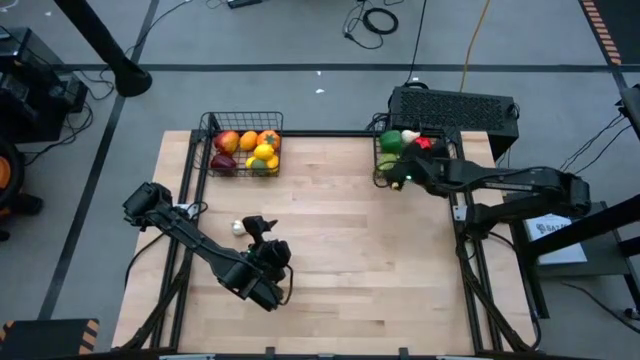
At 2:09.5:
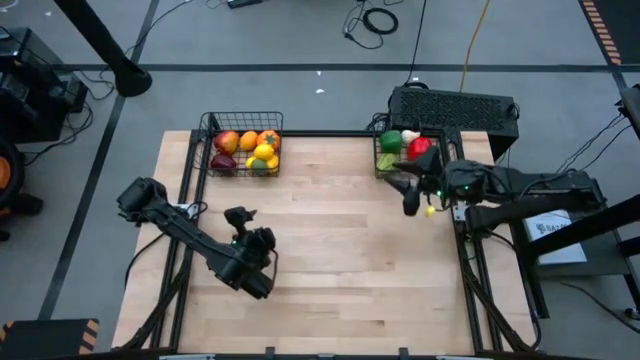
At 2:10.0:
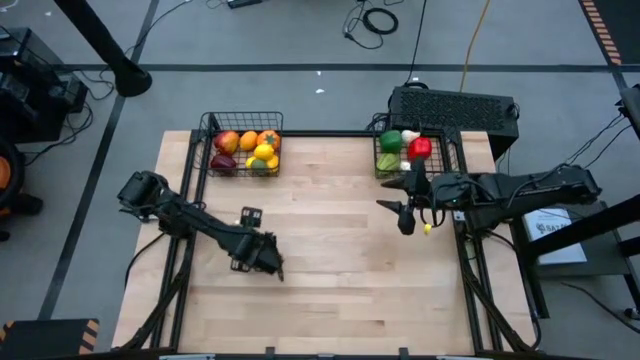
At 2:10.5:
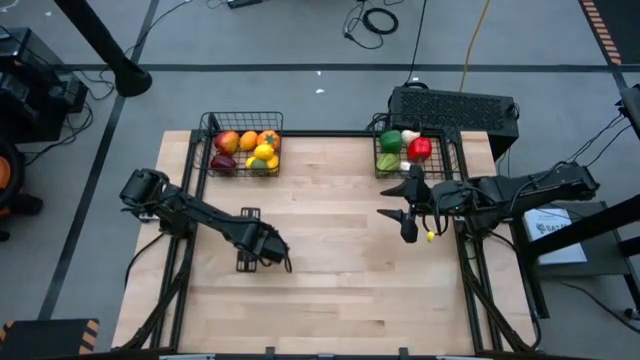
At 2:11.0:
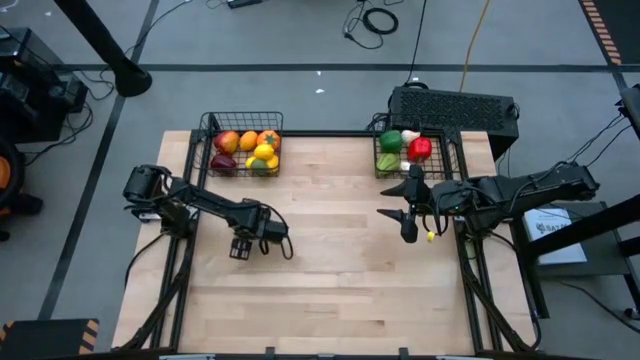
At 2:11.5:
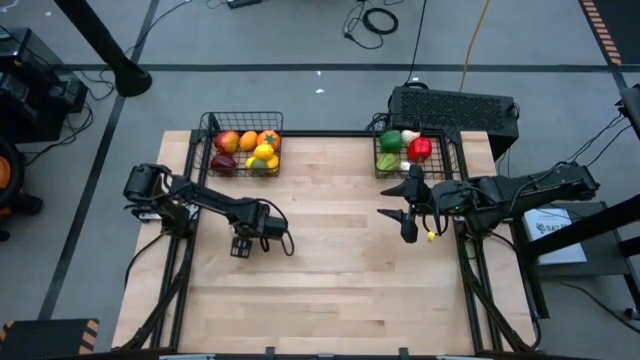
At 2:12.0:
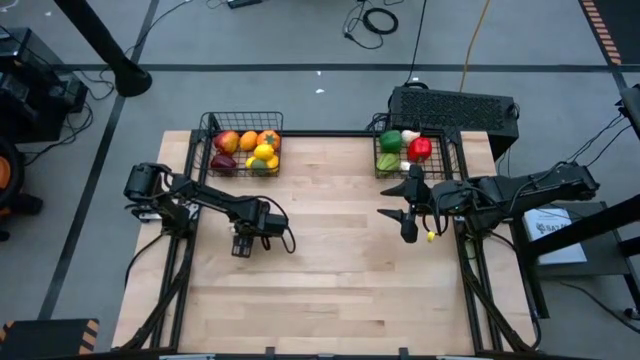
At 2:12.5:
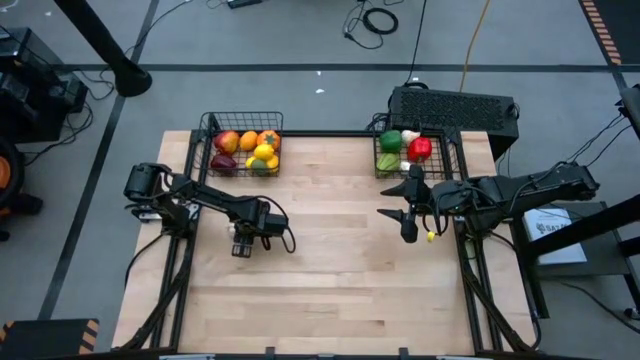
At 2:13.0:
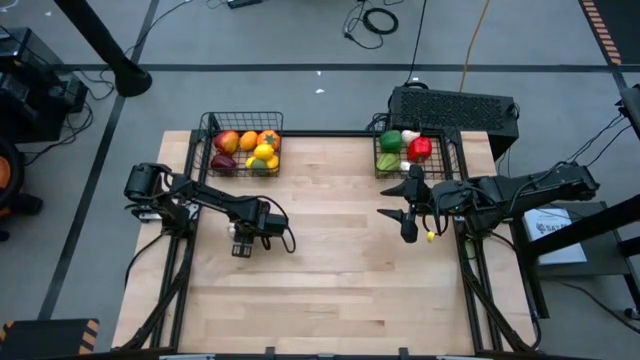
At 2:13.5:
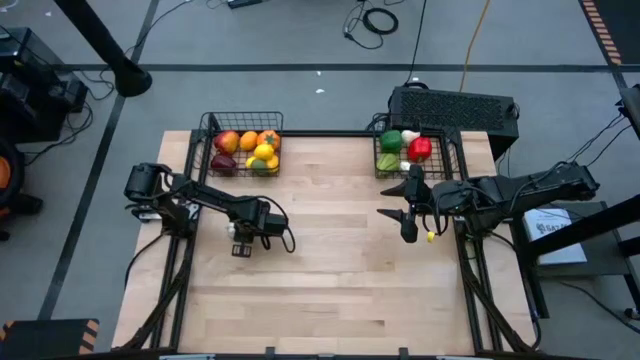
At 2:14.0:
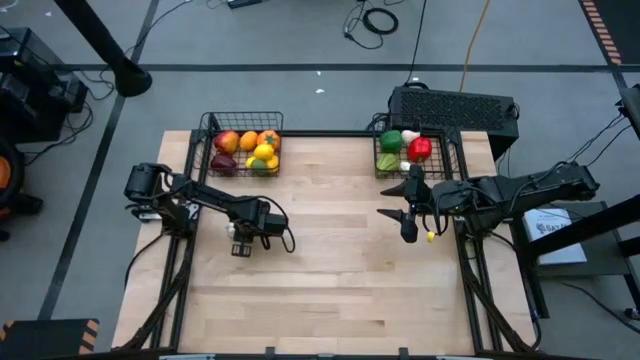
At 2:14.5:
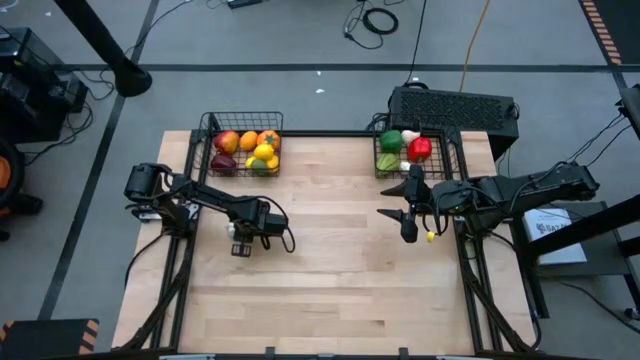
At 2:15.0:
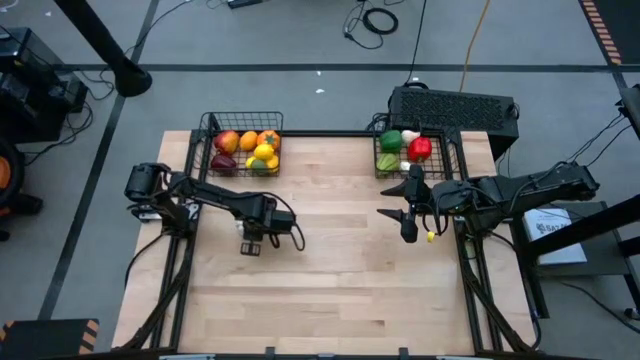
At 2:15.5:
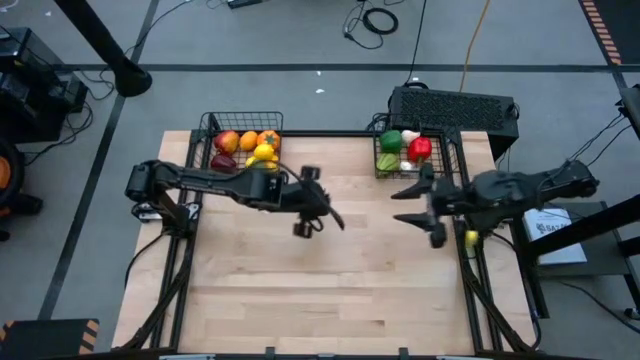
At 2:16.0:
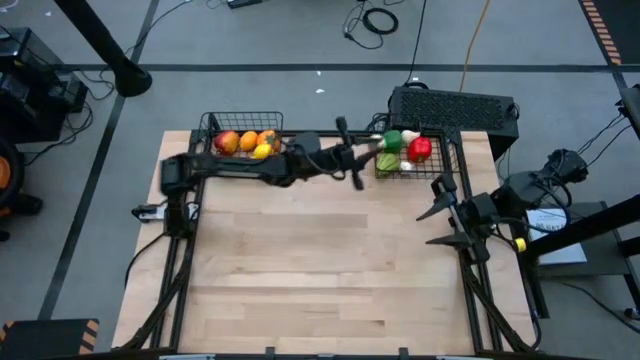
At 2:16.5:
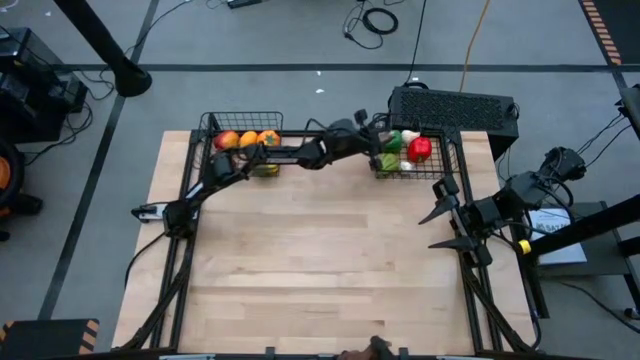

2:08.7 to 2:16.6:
Task: Sort produce into baskets
Put the white garlic in the right basket

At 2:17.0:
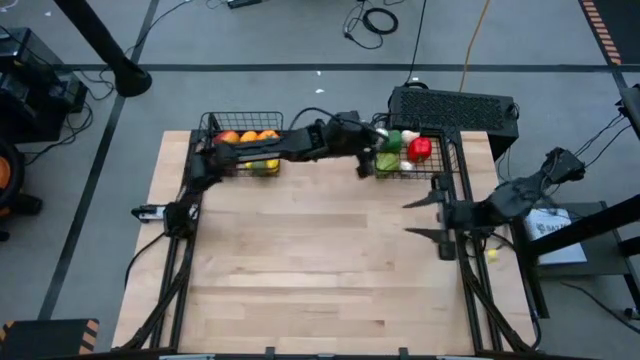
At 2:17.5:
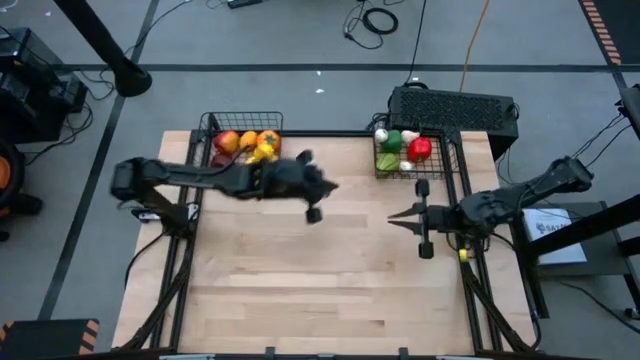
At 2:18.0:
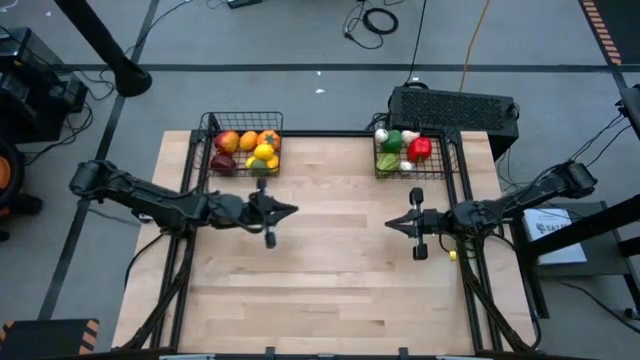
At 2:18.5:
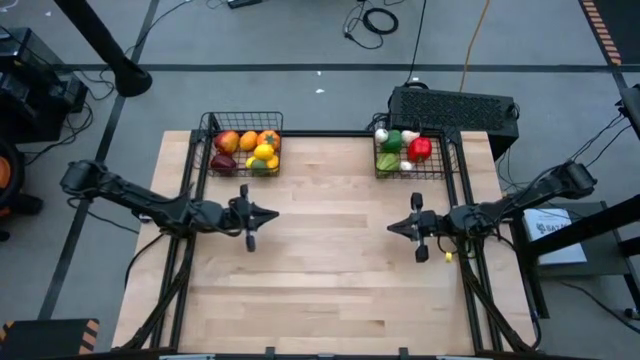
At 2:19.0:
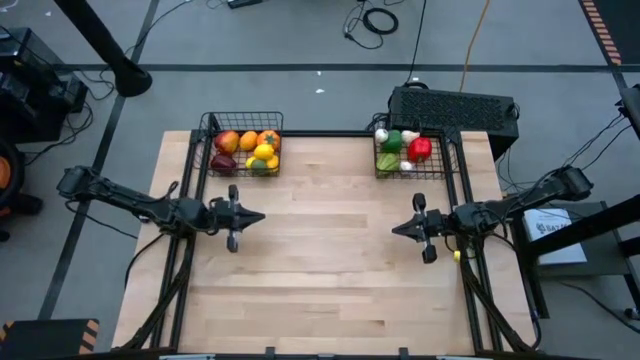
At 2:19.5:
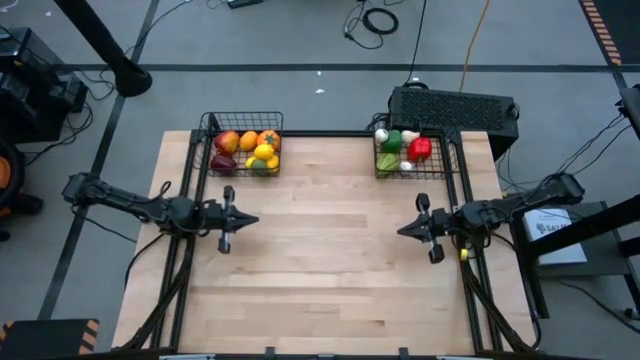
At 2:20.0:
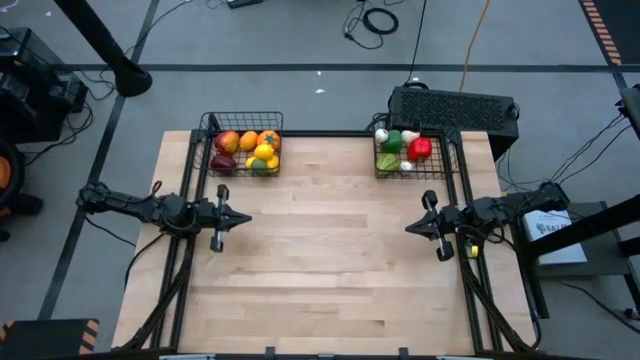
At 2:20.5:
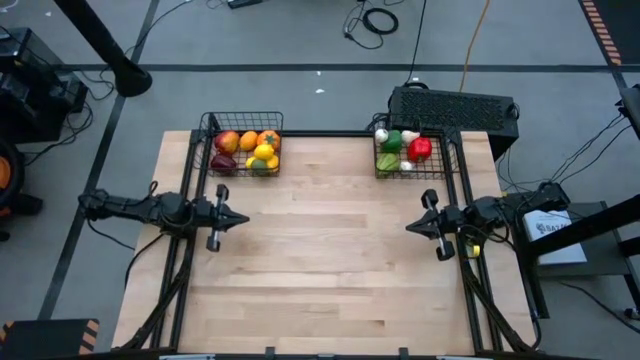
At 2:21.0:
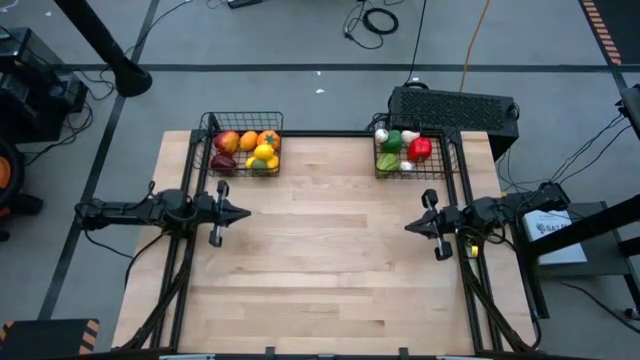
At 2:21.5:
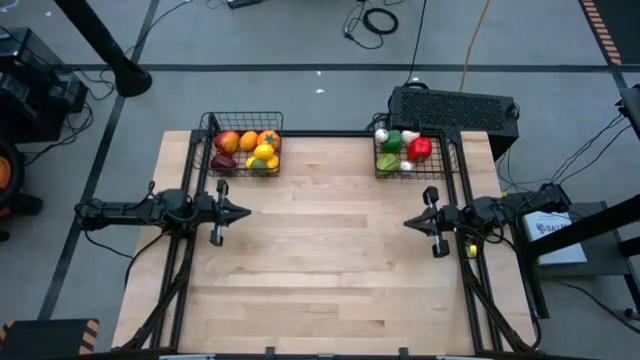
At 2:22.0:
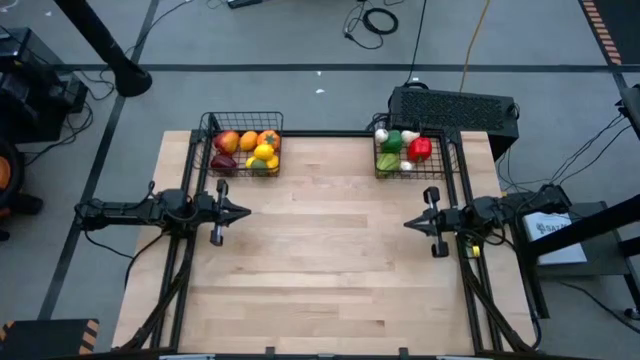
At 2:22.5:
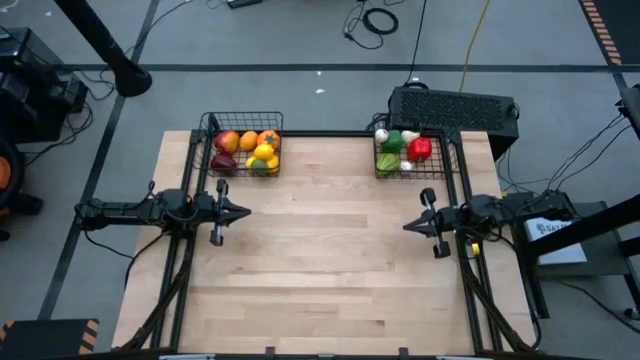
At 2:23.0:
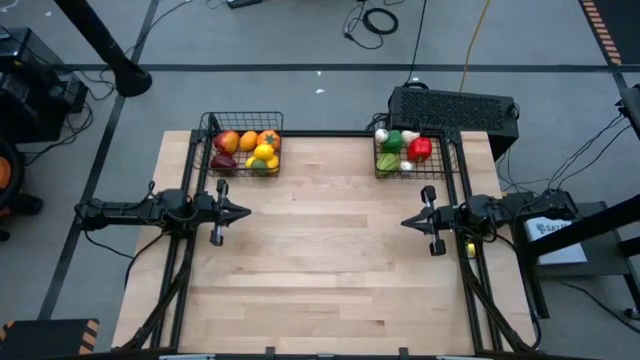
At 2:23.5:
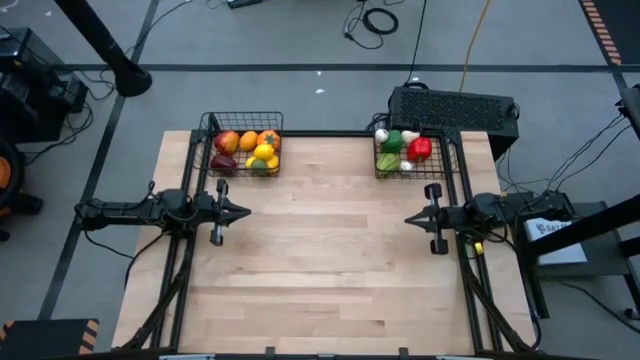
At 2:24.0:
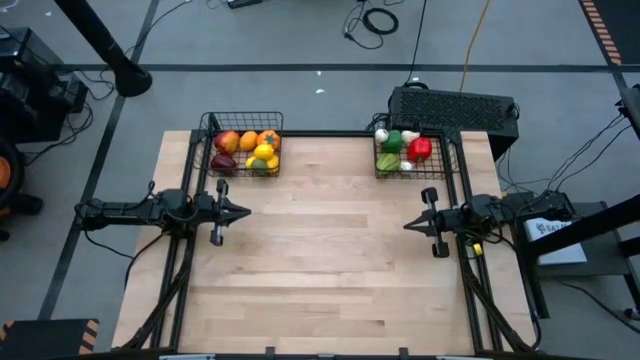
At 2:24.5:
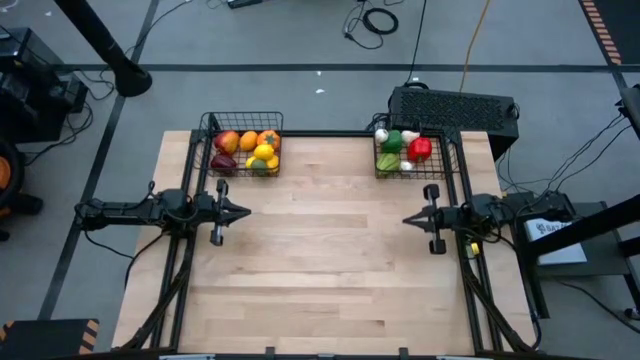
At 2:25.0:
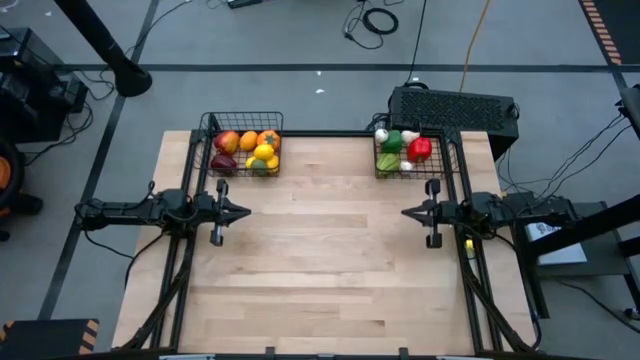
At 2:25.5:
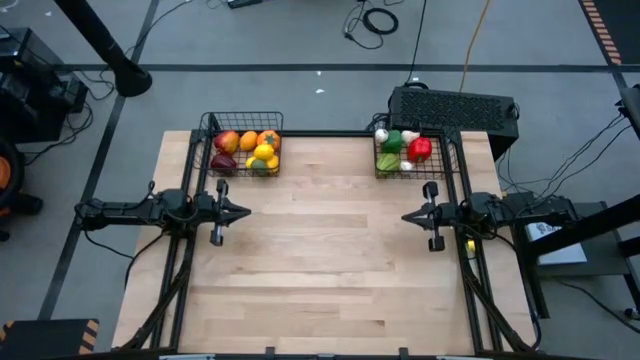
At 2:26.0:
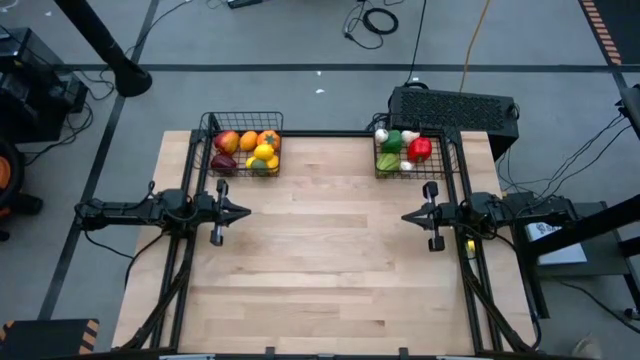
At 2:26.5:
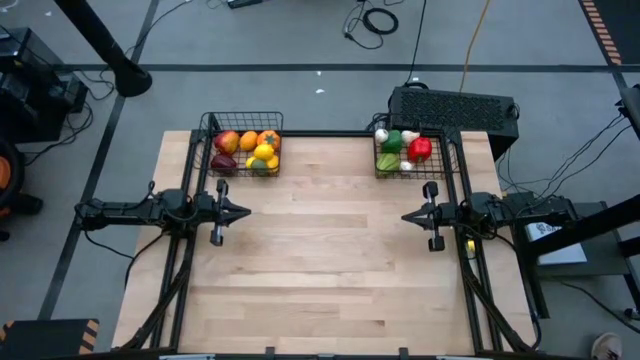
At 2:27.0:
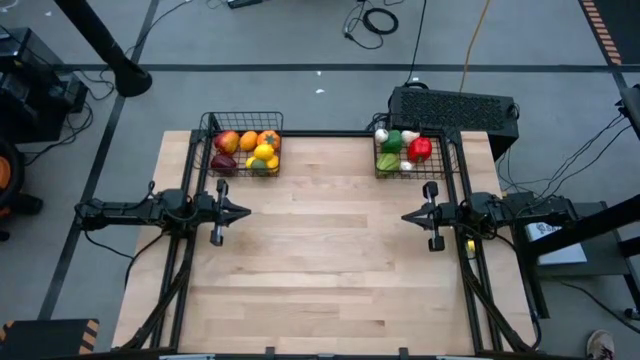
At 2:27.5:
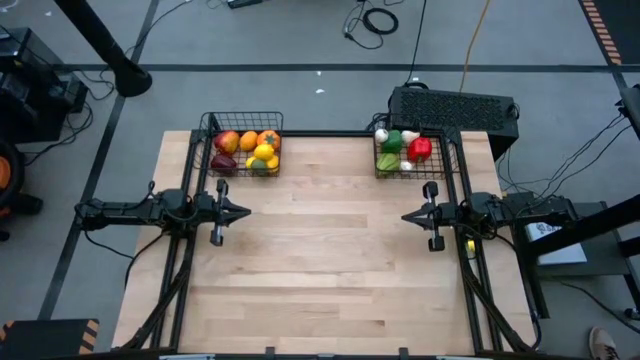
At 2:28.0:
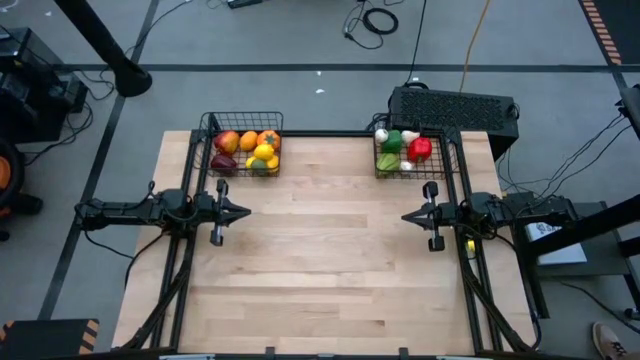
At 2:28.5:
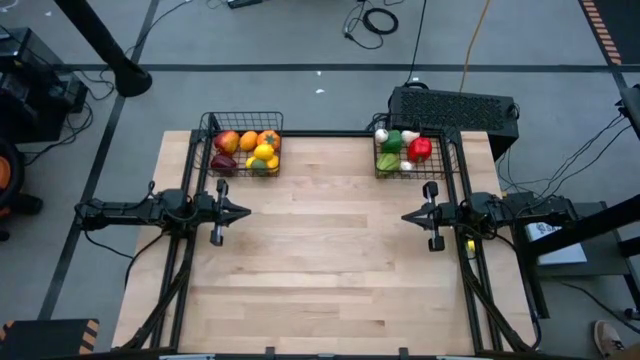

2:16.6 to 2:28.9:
Return to Home Position
